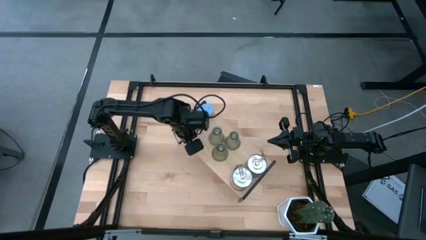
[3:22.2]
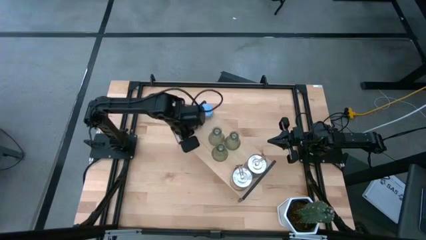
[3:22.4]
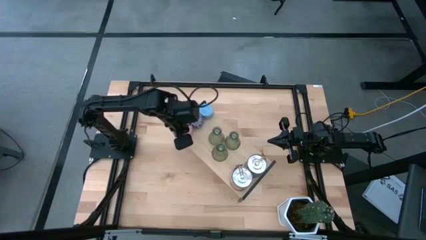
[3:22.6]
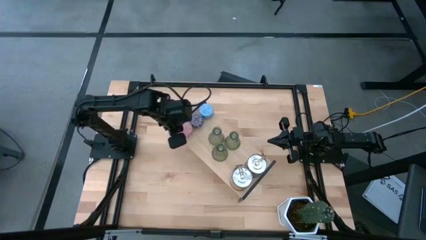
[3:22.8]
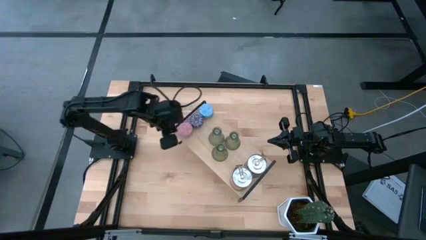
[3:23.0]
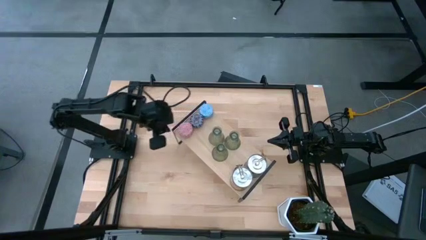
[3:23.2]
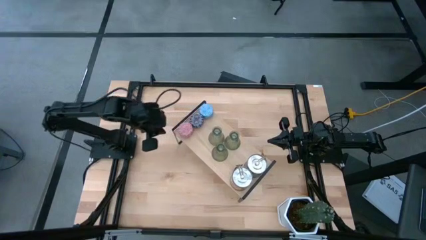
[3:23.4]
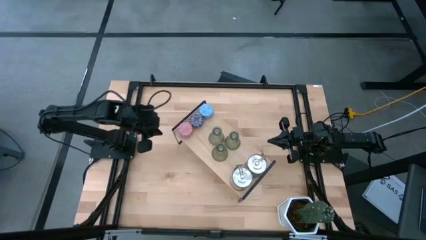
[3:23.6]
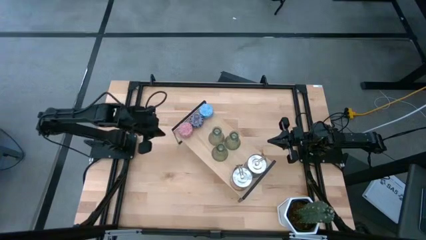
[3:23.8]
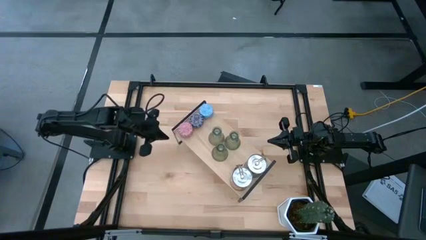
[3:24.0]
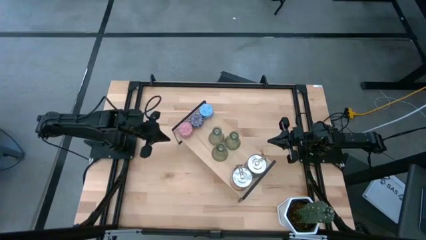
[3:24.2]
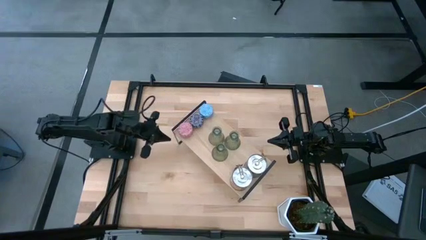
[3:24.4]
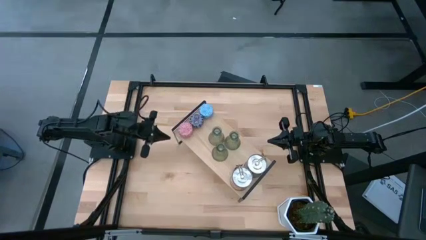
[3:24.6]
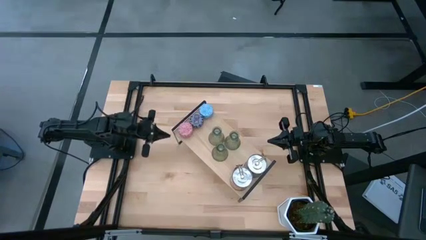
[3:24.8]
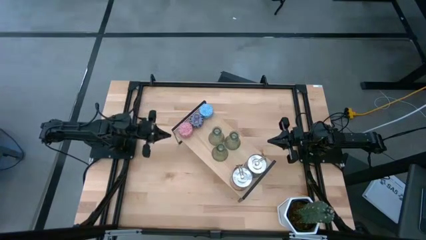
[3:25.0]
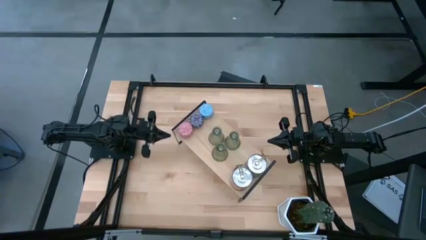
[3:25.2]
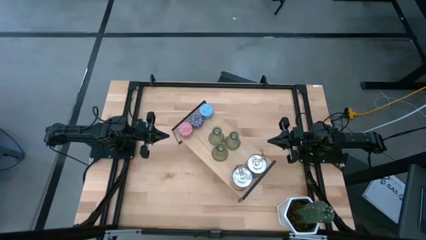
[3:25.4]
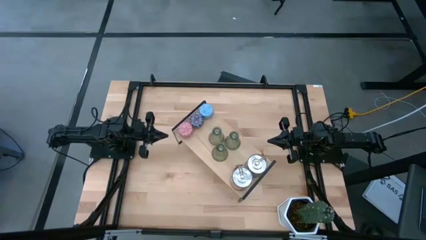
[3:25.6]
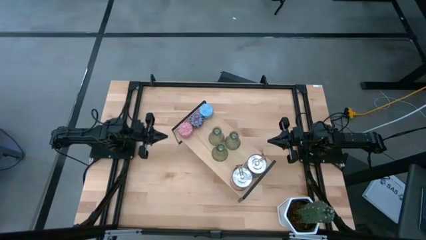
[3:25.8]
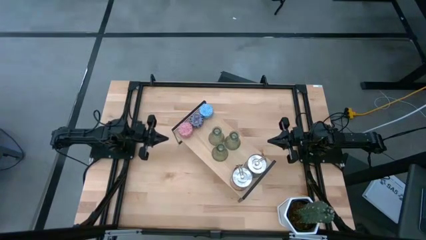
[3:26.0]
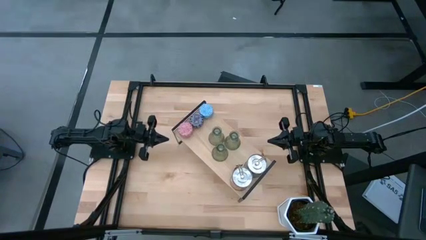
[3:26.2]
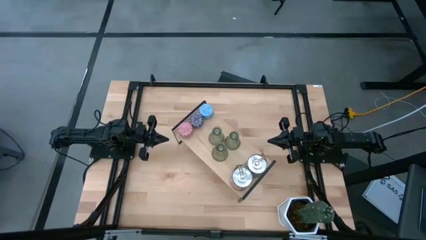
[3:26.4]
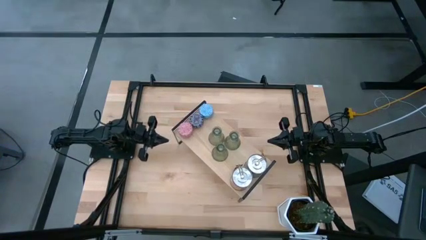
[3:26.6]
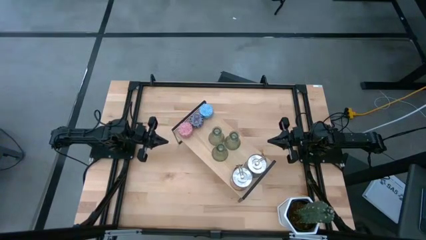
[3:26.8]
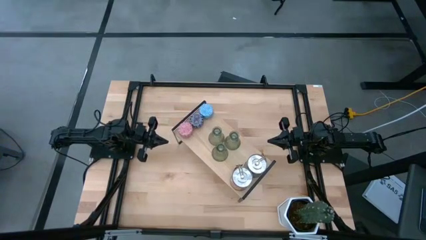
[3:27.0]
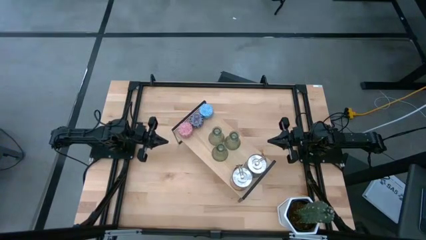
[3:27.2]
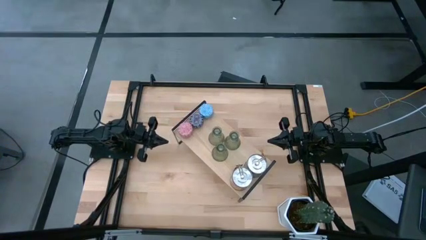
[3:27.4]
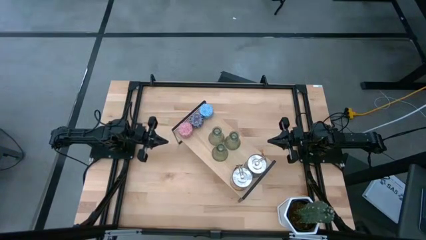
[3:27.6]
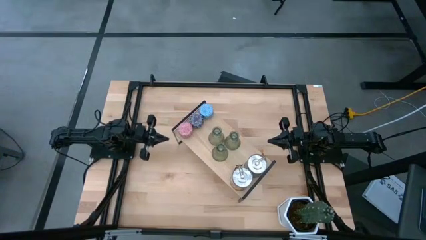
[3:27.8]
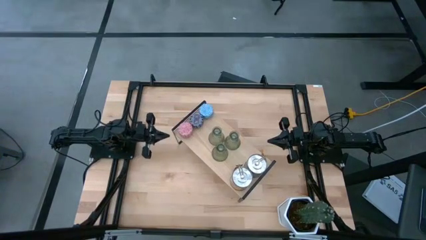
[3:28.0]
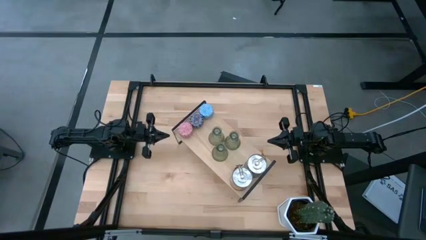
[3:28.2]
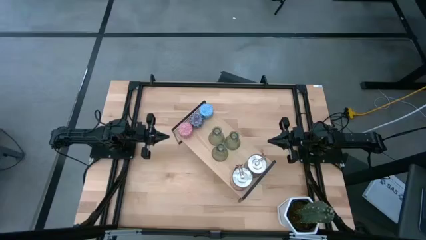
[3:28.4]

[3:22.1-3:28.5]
Task: Pick & Place candle stick holders
Return to Home Position

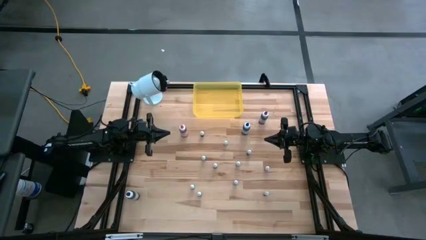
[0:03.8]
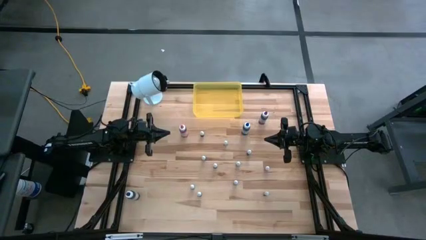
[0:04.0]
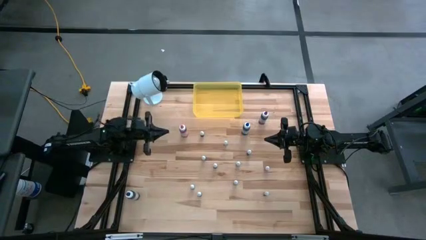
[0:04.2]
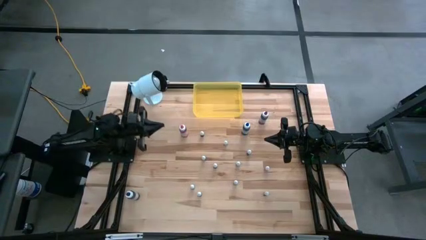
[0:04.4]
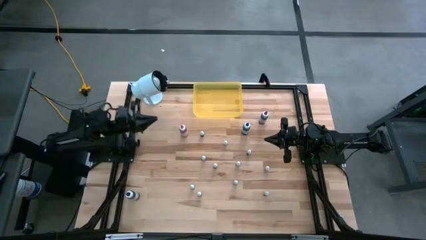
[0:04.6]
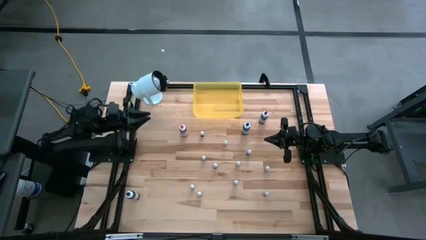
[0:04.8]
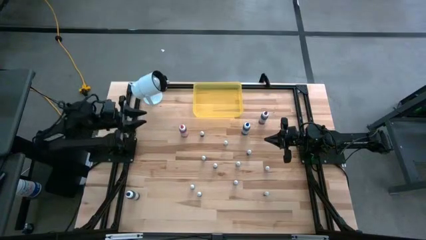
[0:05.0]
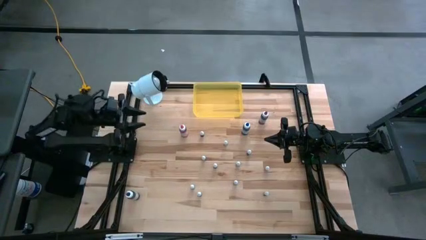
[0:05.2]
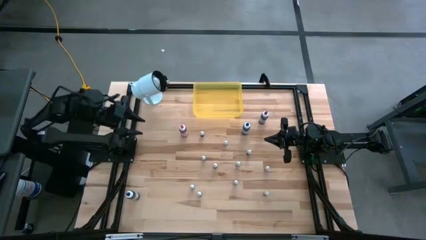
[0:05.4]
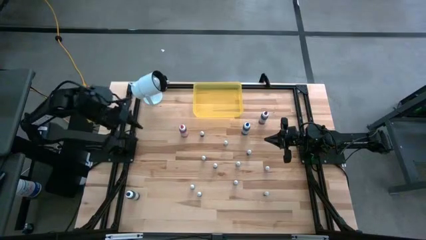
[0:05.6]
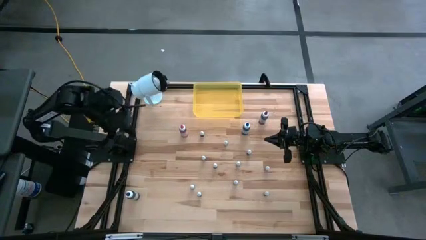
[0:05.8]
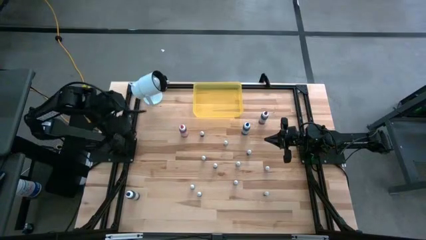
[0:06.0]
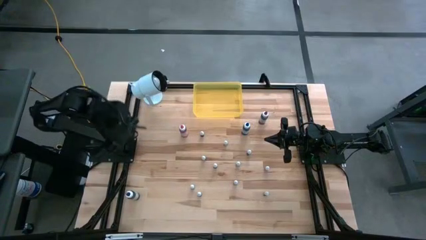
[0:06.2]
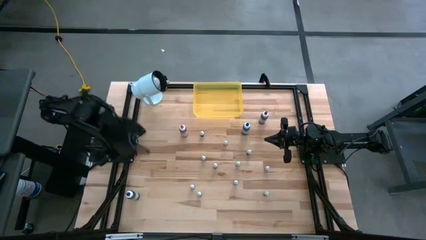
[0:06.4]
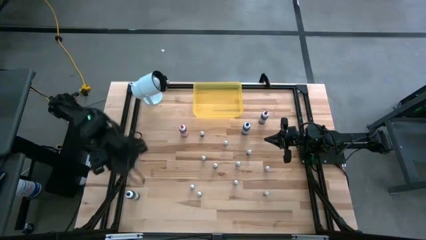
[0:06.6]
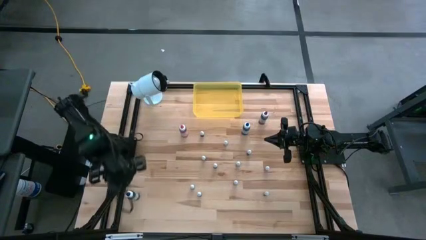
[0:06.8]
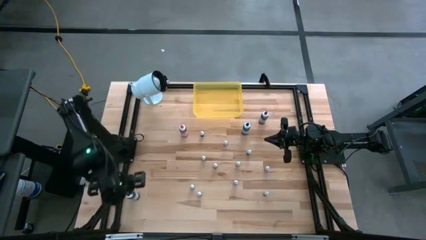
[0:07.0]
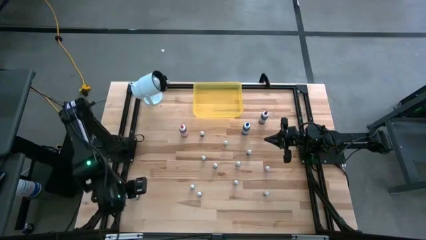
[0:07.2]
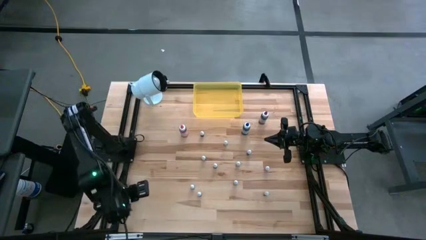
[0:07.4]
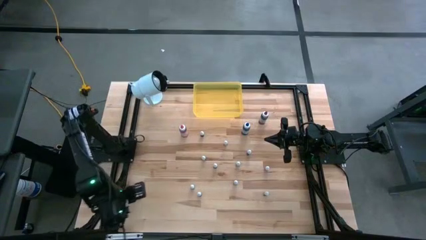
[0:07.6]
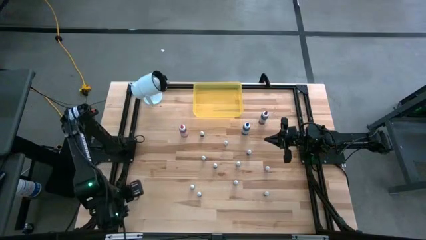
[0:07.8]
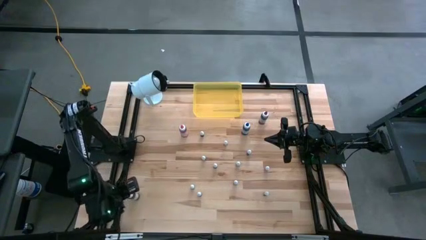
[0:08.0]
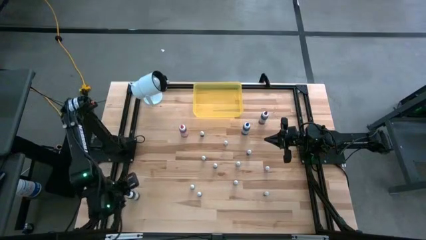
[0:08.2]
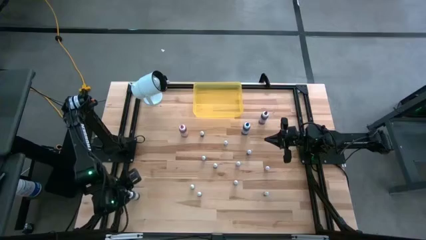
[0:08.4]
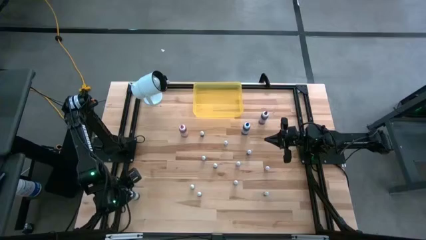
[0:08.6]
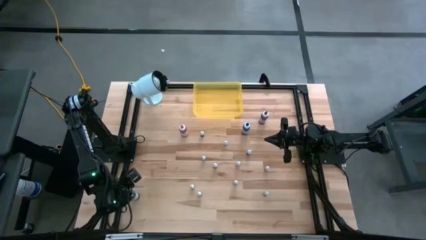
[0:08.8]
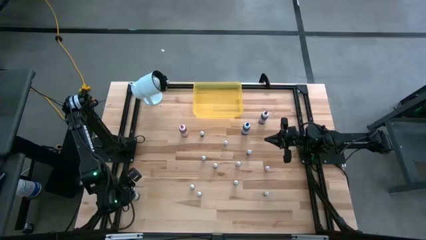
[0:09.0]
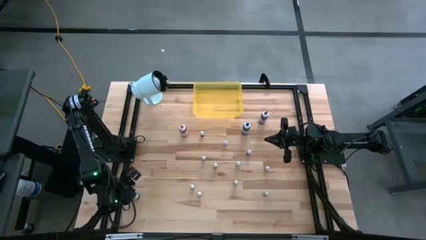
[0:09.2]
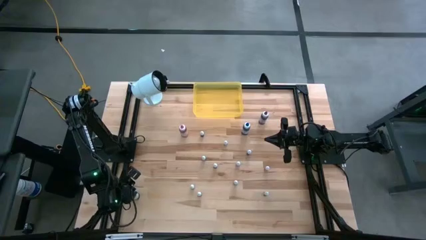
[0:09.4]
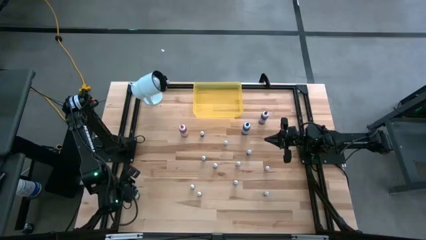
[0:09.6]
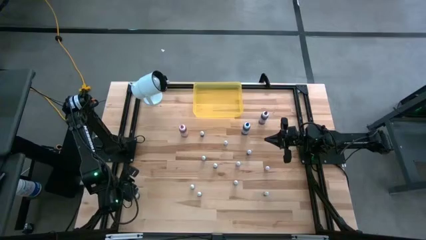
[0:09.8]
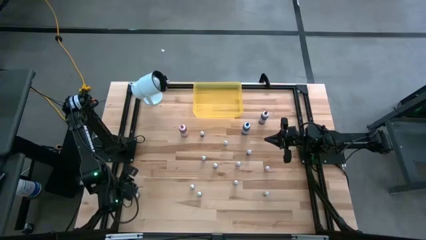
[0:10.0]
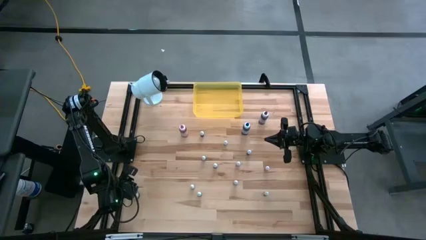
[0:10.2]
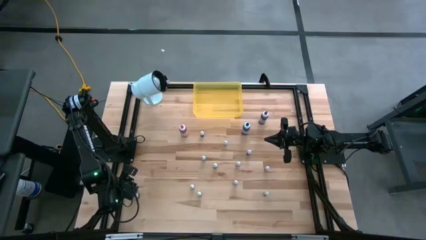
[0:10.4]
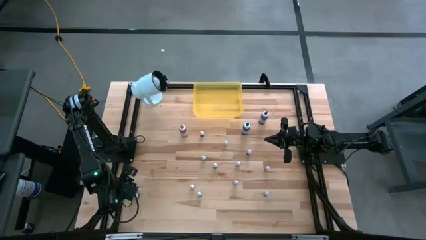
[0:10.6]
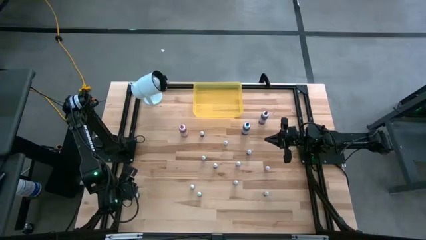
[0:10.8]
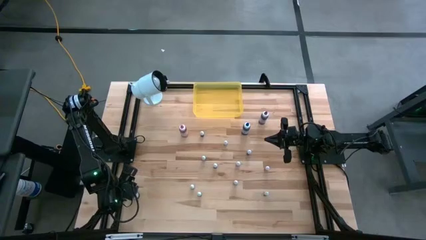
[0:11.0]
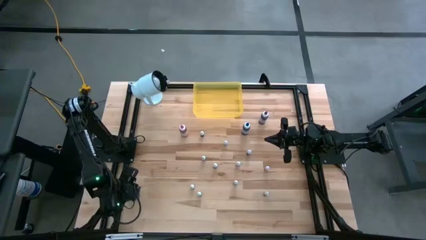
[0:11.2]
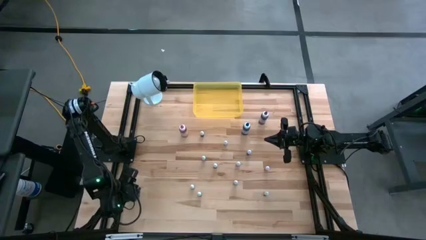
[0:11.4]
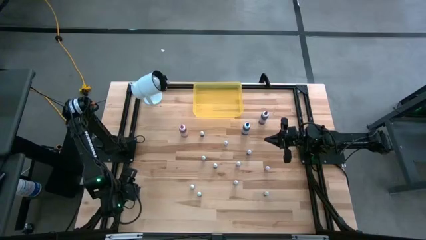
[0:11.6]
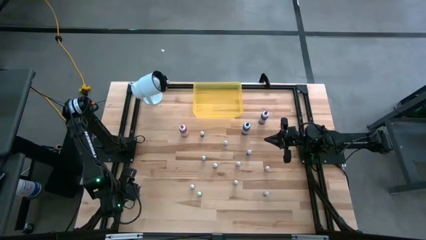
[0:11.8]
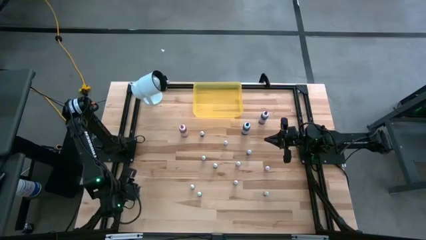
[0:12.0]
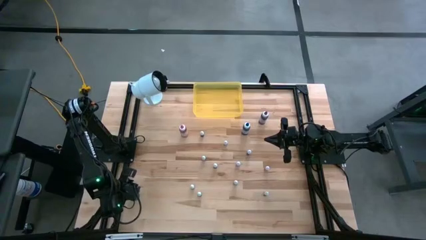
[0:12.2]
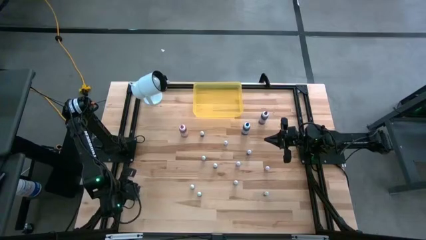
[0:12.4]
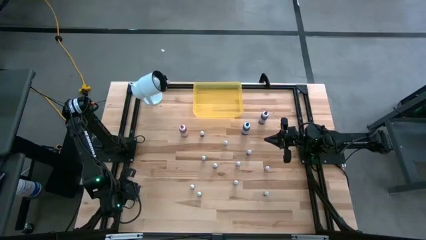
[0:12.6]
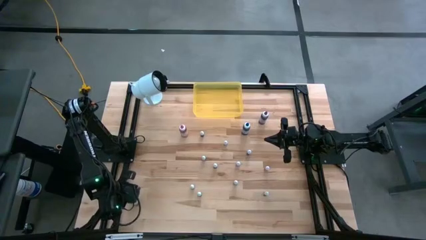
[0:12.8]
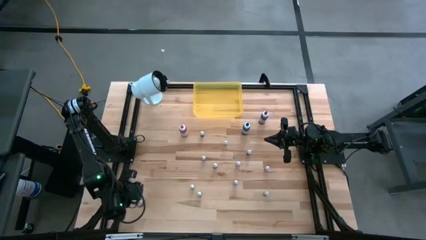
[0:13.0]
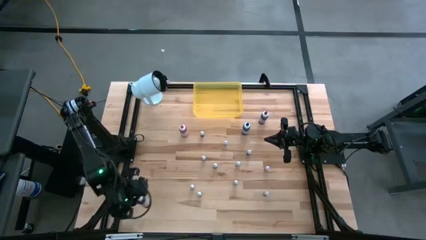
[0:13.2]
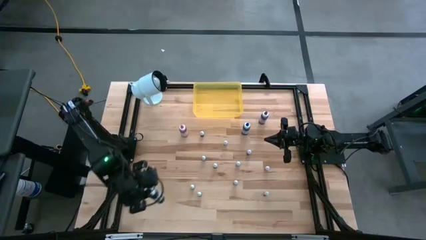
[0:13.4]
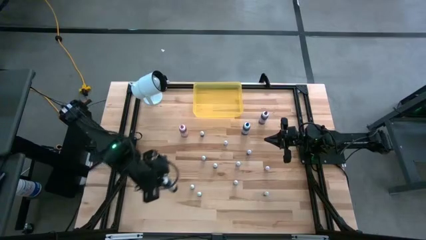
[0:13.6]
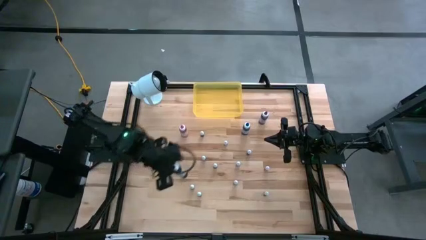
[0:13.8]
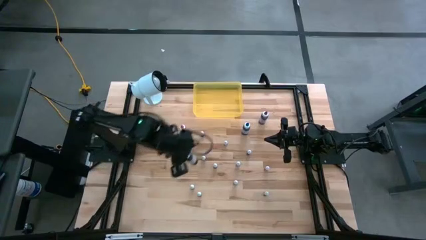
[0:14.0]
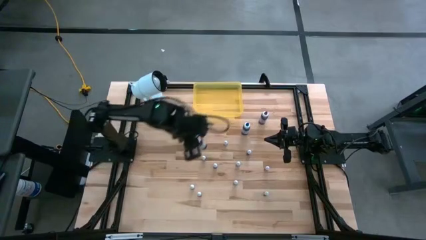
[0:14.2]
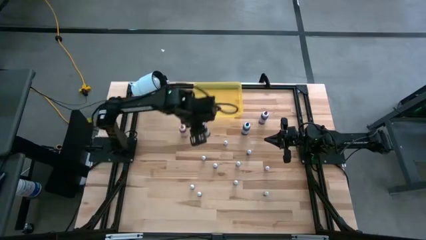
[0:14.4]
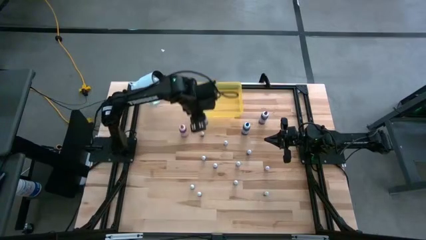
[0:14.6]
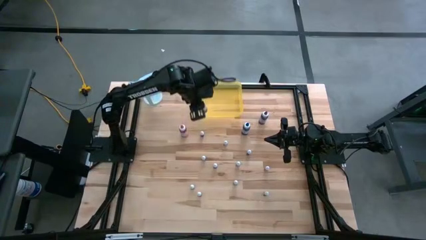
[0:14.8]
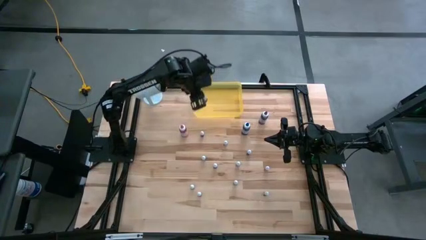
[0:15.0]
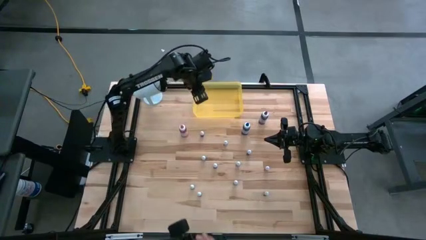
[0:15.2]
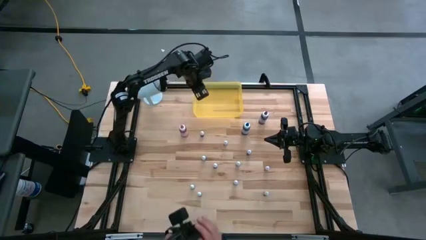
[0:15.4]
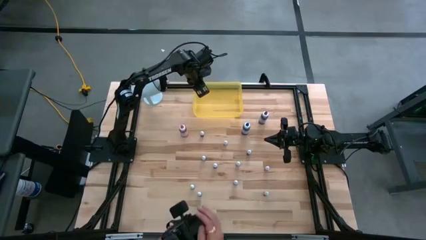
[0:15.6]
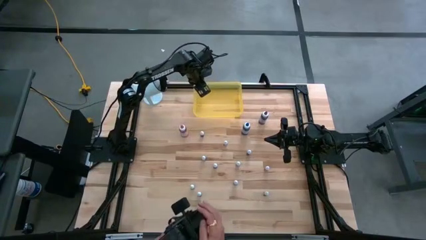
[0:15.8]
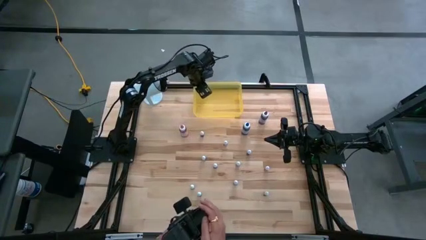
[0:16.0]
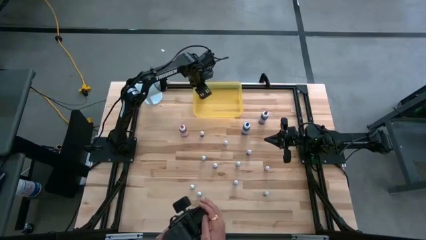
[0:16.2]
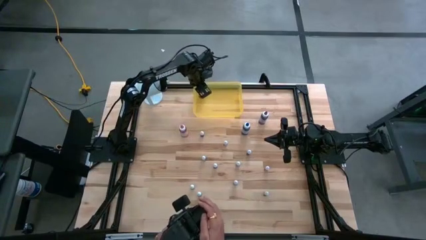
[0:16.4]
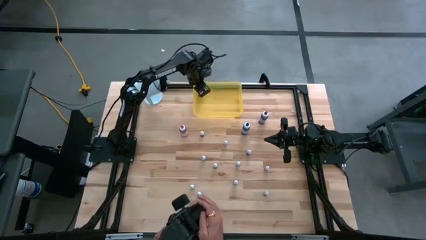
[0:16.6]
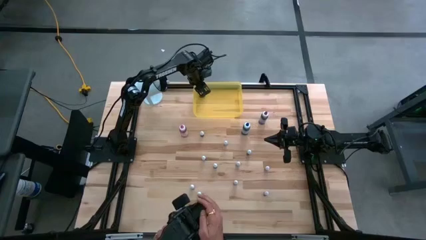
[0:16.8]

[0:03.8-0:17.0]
Task: Pick & Place food coloring
Put the large black food coloring bottle into the yellow container
